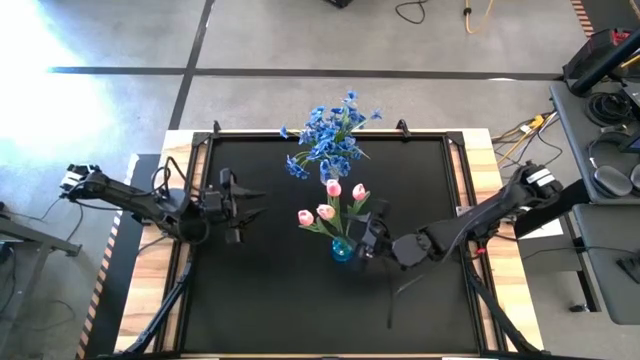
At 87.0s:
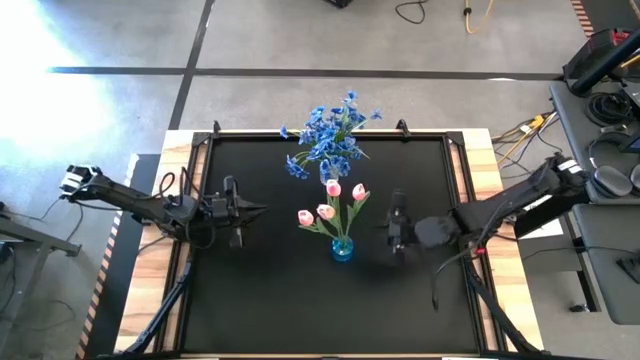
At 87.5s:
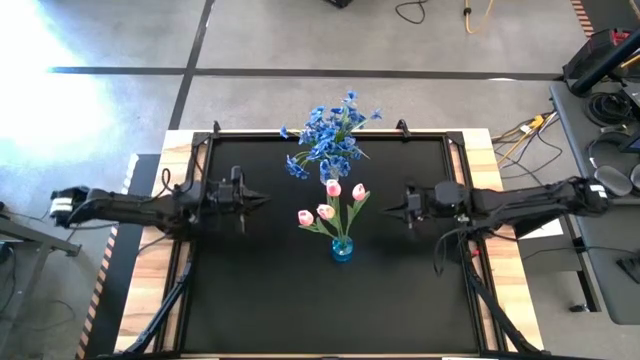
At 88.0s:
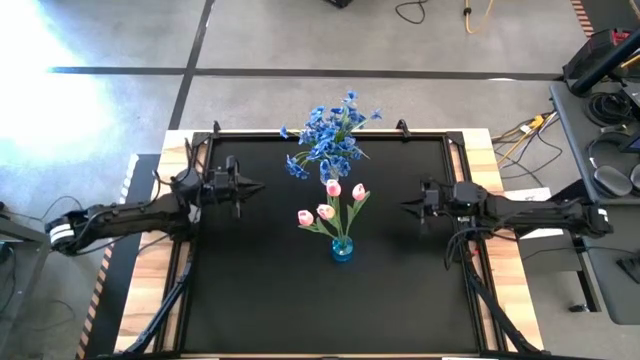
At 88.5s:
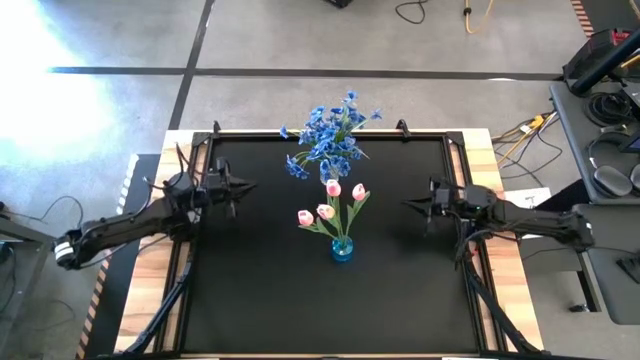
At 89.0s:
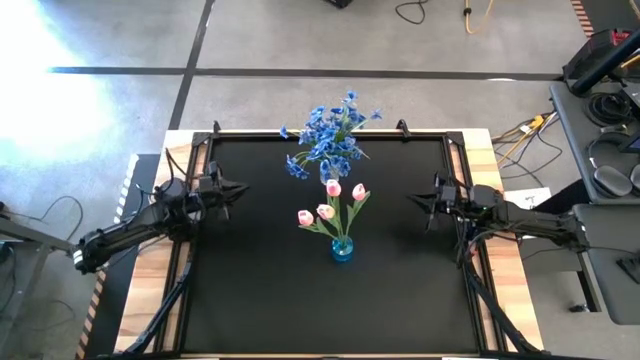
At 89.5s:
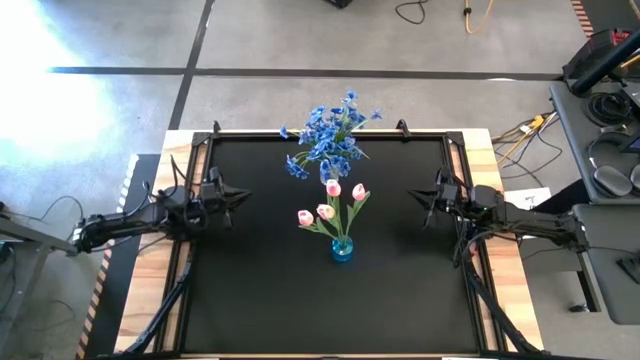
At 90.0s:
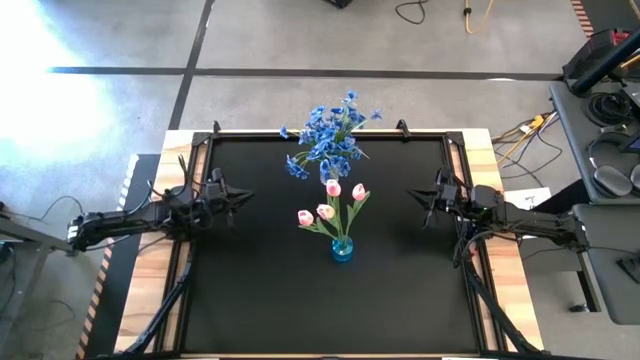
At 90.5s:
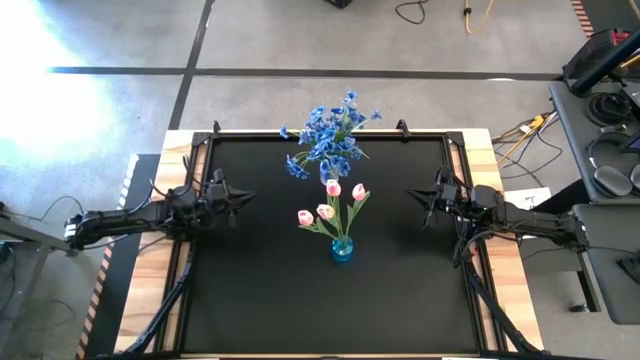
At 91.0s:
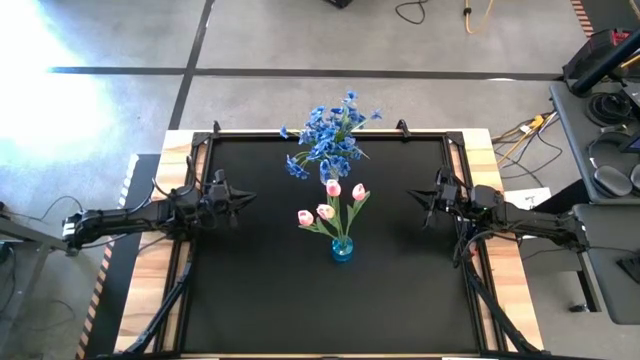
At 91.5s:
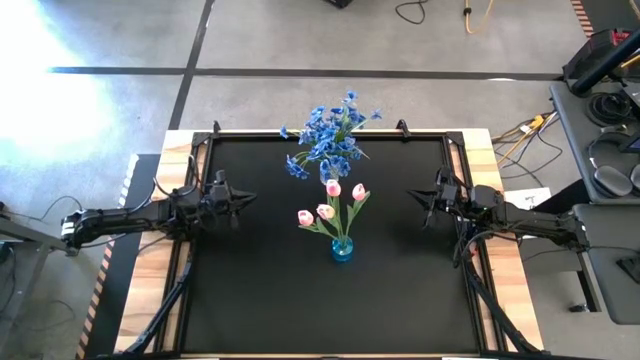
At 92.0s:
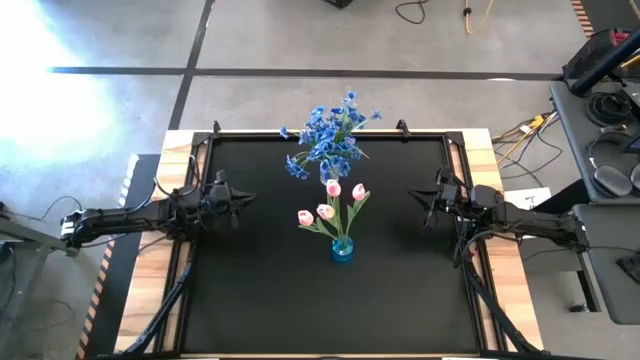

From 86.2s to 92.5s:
Task: Sort flowers into vase by color
Return to Home Position

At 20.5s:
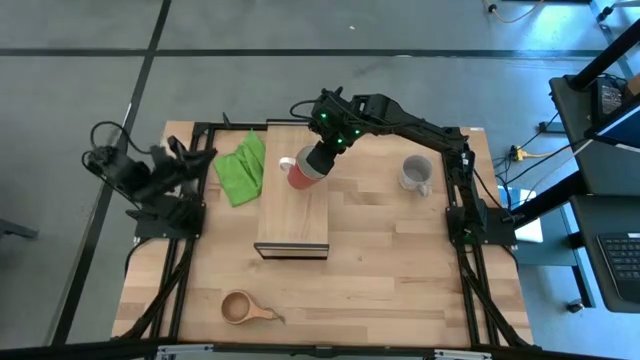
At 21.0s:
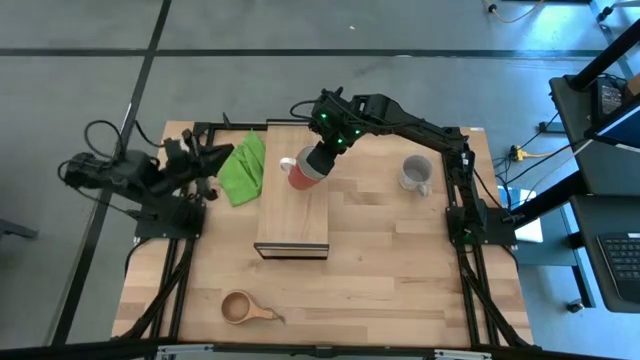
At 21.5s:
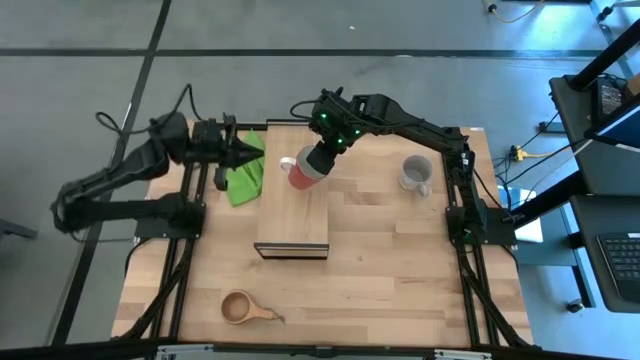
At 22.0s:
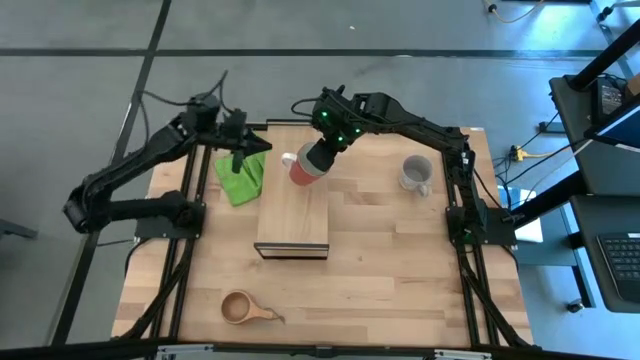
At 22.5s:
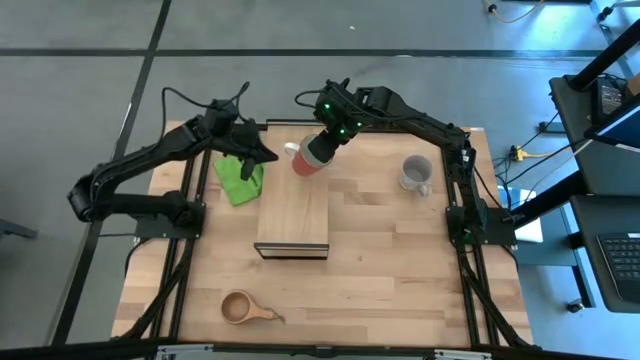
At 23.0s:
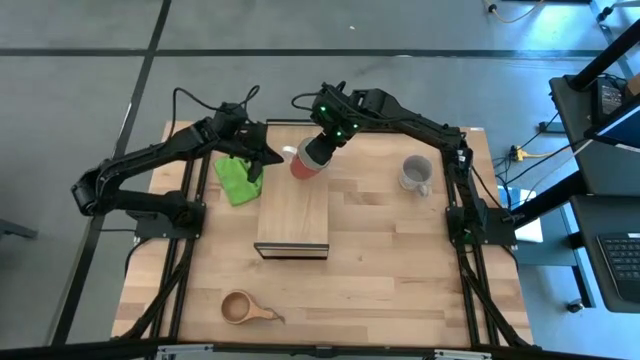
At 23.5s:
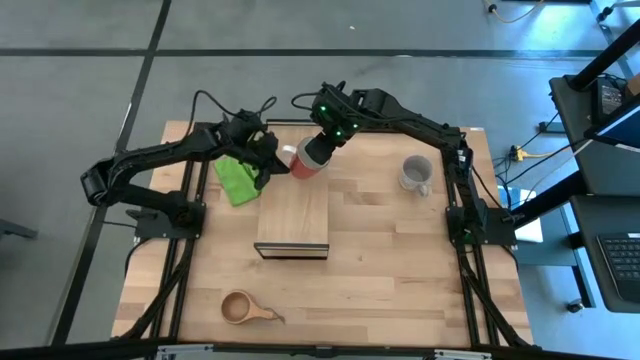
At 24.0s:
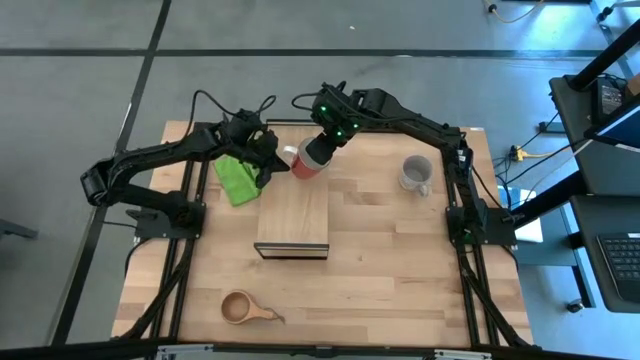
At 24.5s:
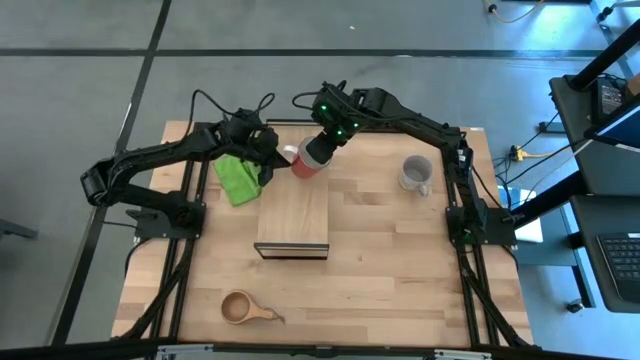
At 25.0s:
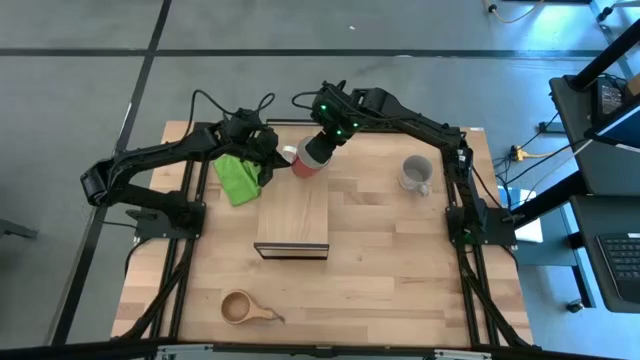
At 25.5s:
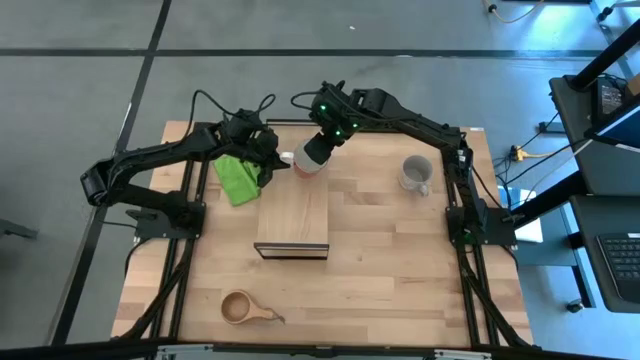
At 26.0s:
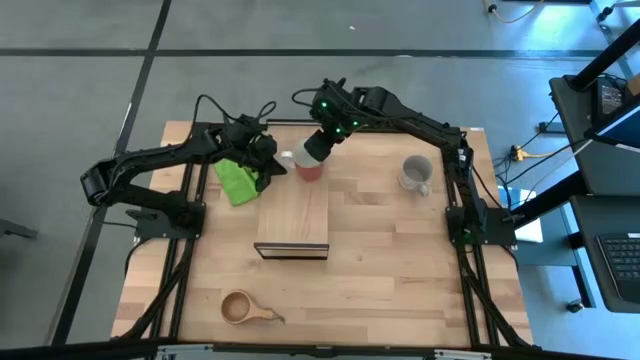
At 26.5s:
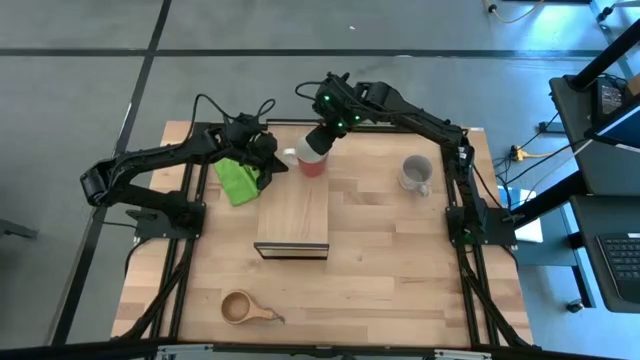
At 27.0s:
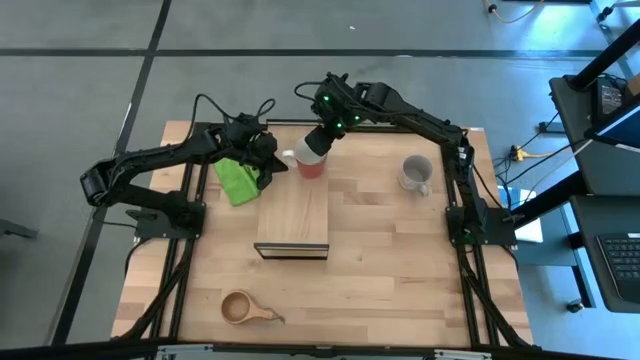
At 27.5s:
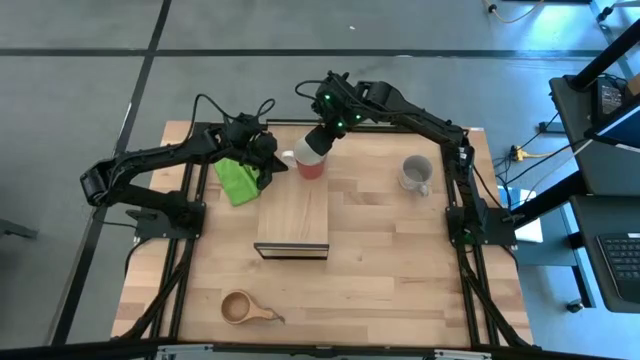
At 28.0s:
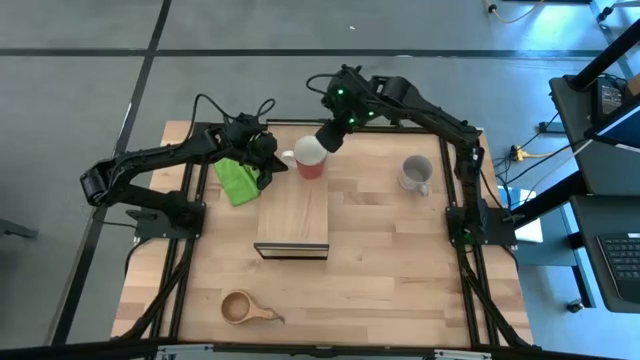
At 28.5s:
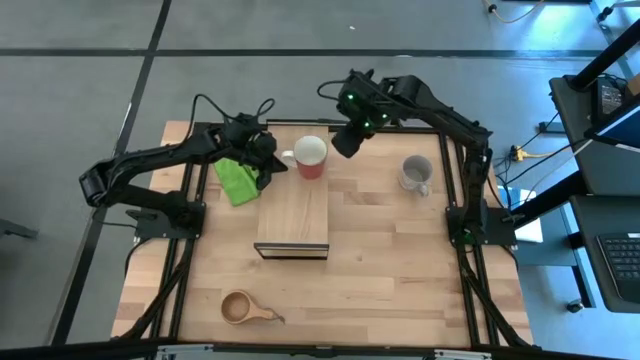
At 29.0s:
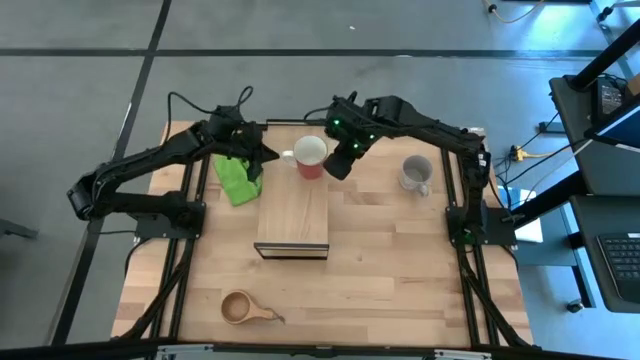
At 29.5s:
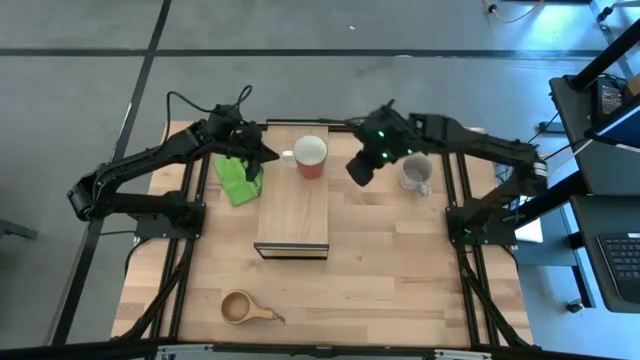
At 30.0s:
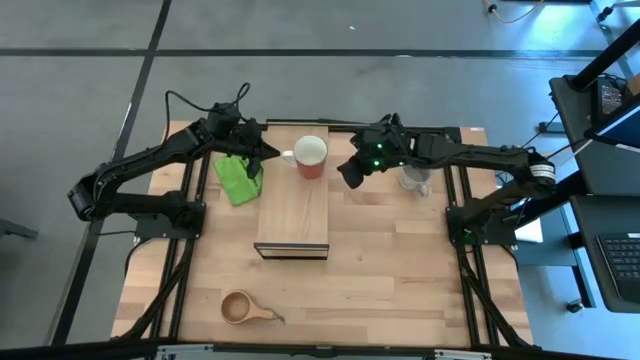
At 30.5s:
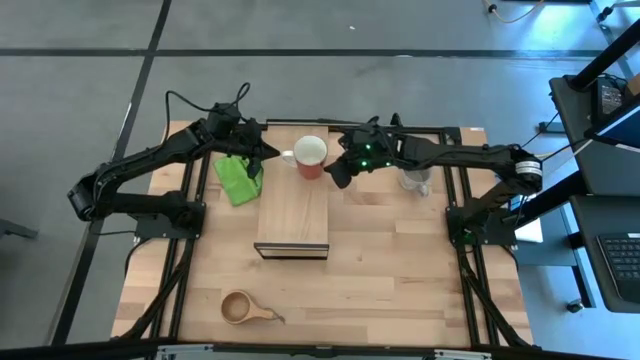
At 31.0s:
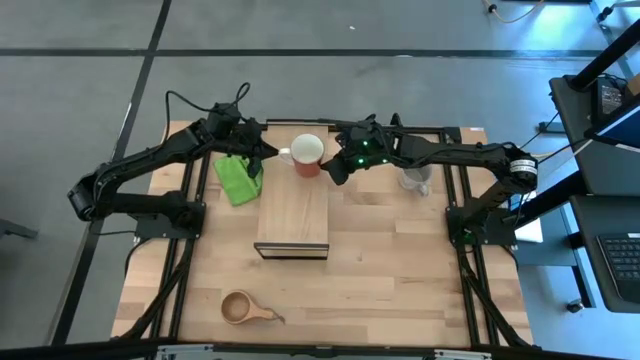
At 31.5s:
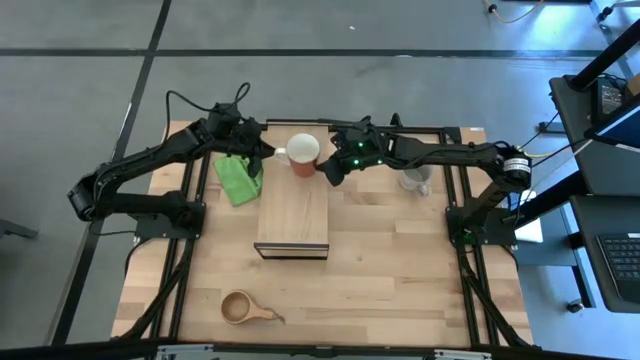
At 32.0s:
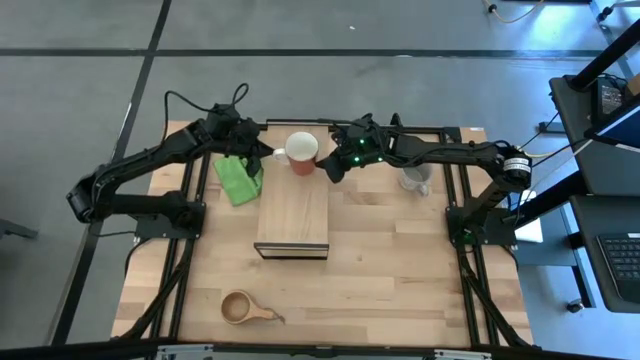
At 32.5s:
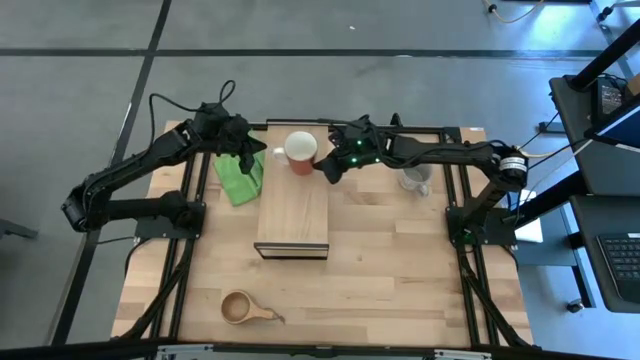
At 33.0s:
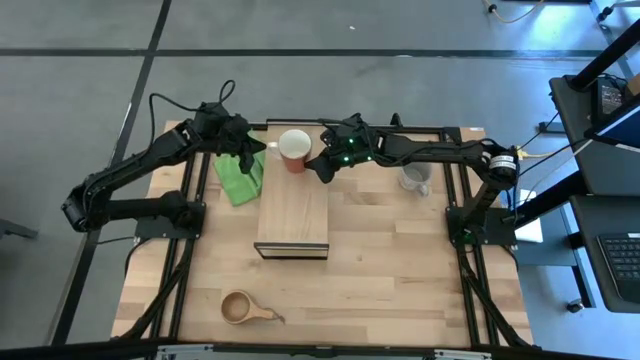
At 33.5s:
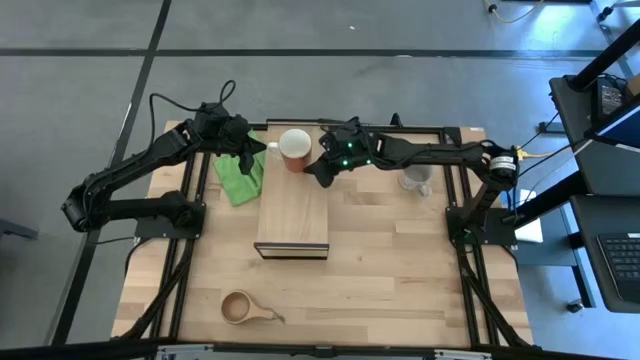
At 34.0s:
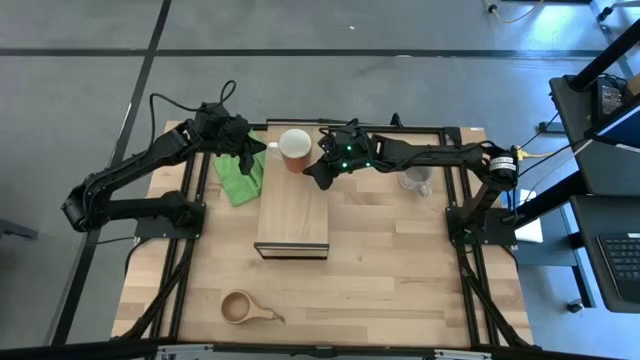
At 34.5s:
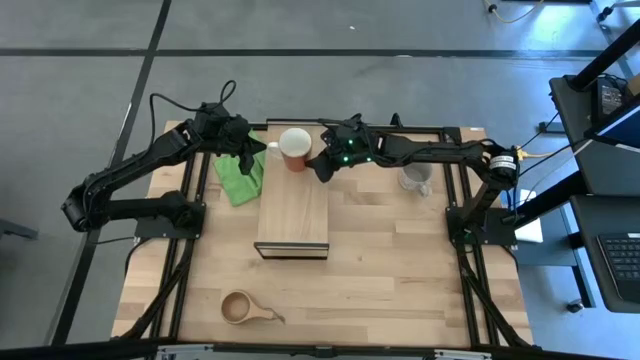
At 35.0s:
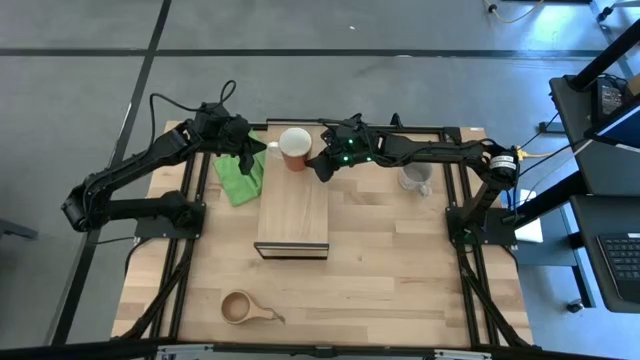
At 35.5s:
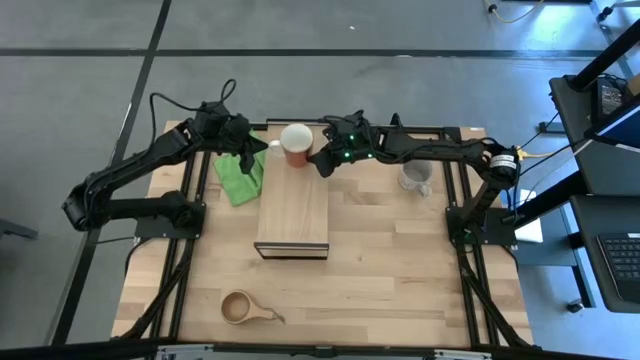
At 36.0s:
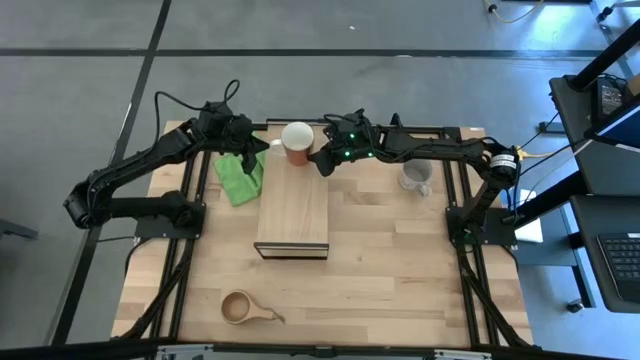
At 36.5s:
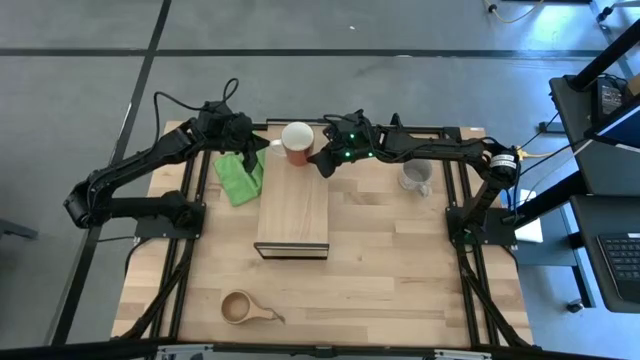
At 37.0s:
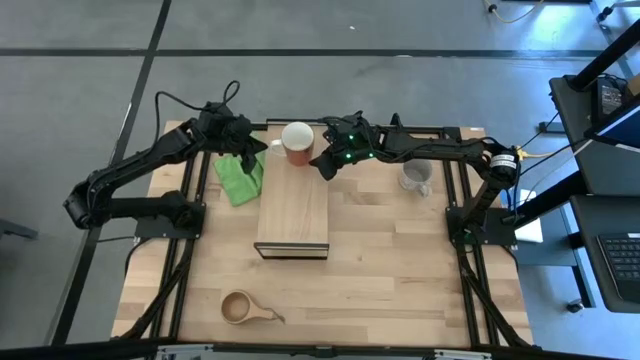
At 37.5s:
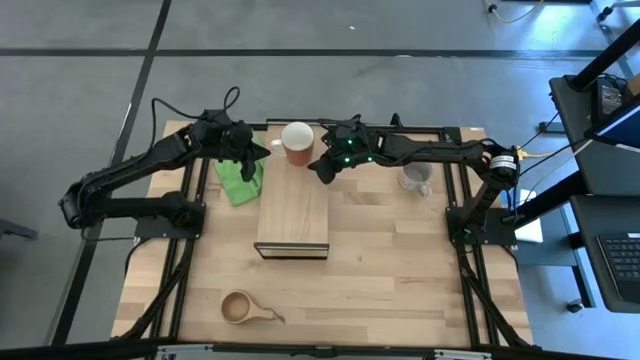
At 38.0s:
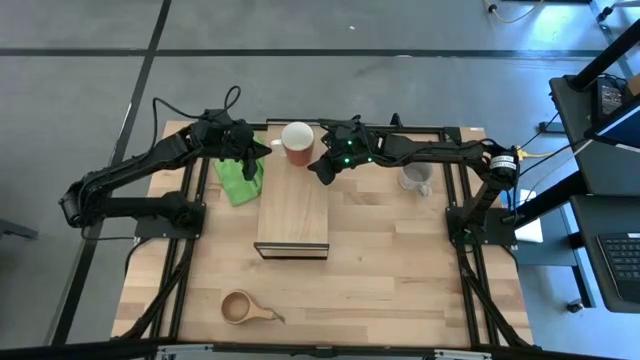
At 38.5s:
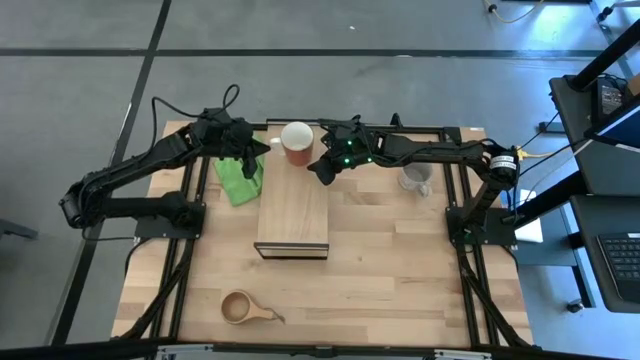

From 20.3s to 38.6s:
Task: Stack small to large cups/mugs on shelf
Put the red mug on the shelf
